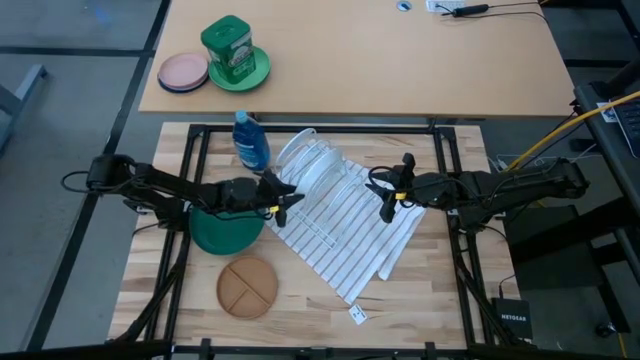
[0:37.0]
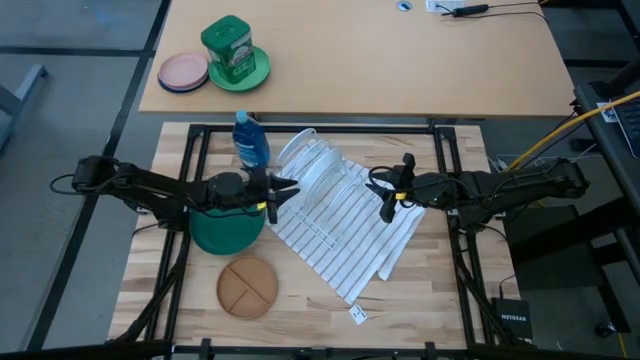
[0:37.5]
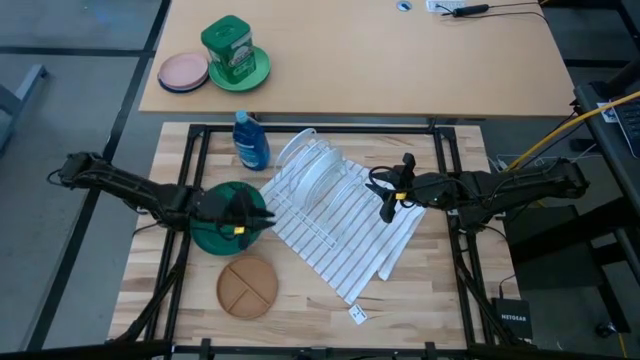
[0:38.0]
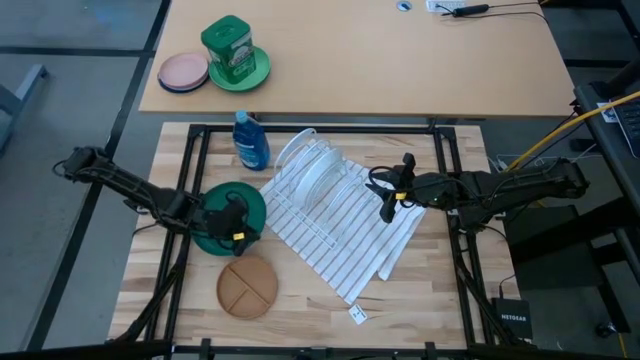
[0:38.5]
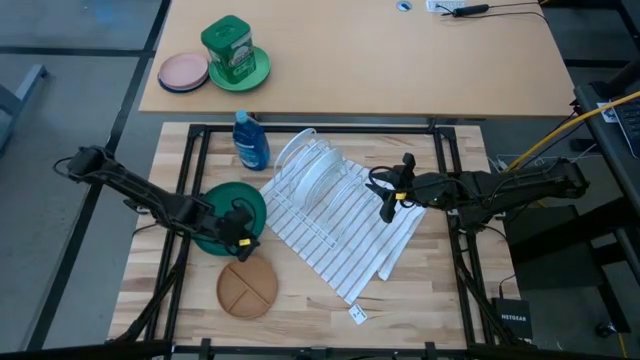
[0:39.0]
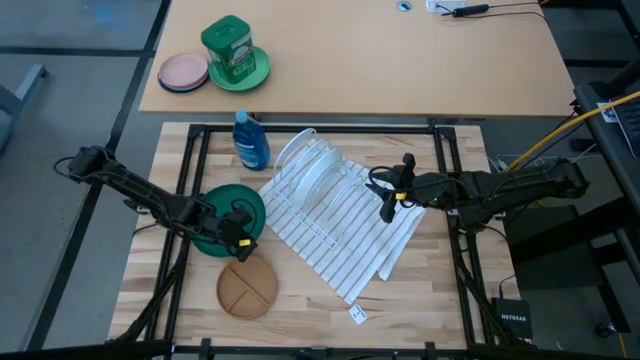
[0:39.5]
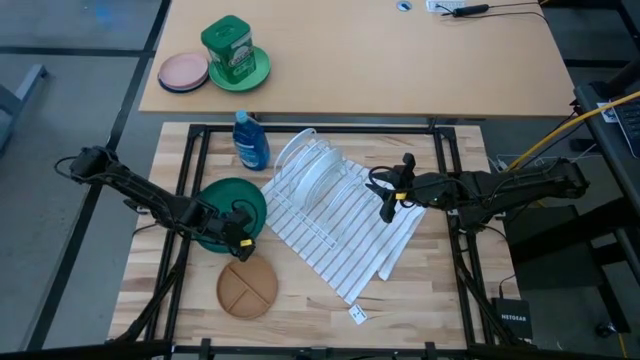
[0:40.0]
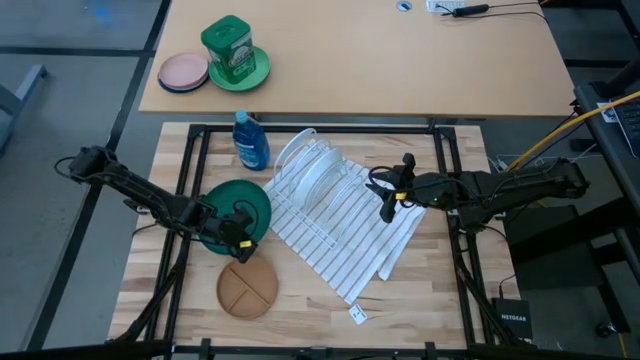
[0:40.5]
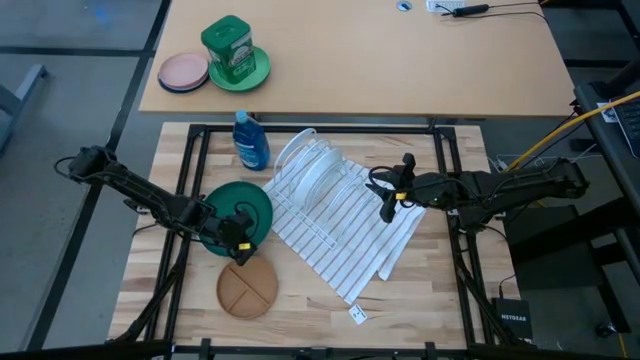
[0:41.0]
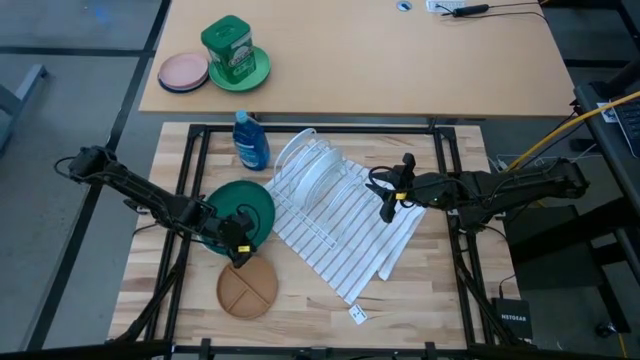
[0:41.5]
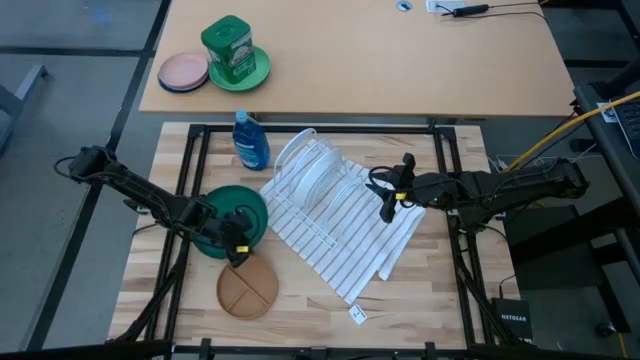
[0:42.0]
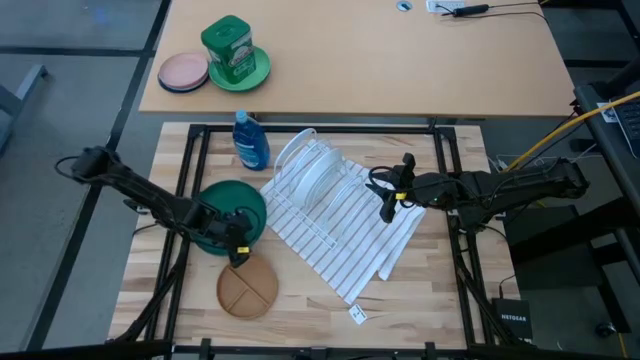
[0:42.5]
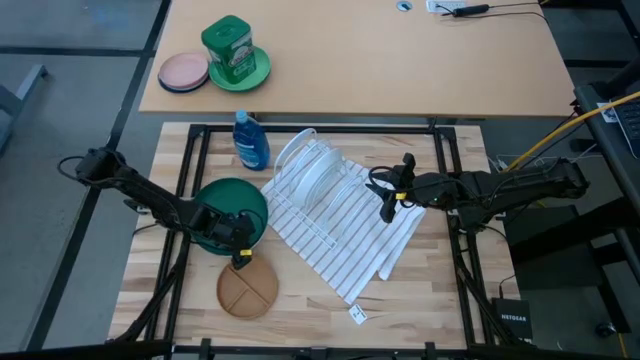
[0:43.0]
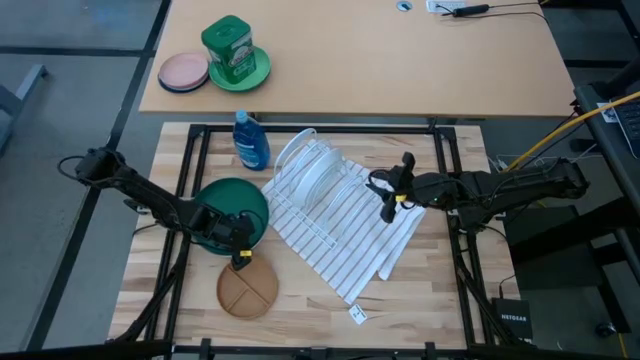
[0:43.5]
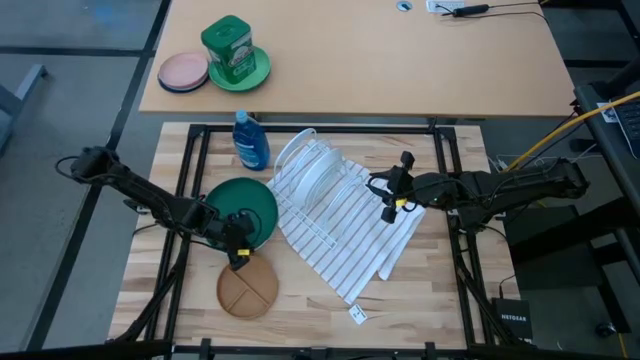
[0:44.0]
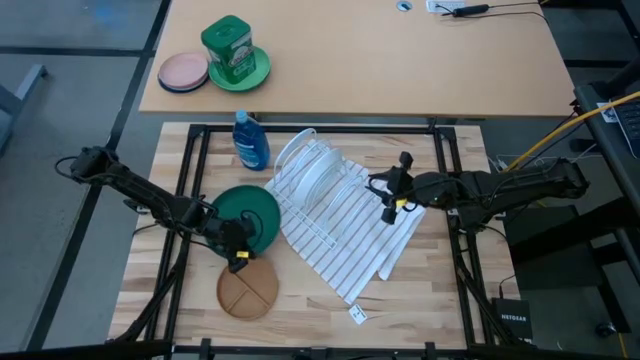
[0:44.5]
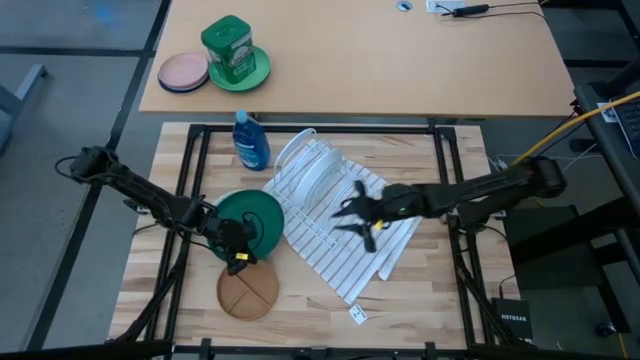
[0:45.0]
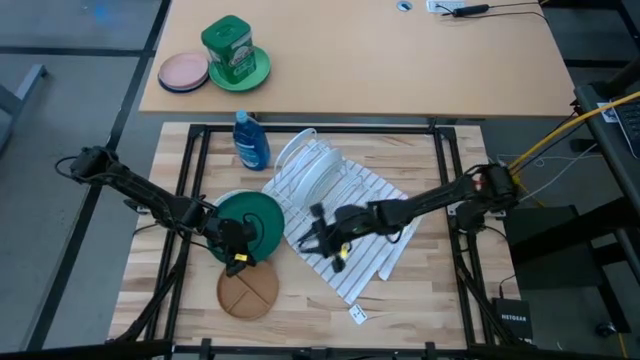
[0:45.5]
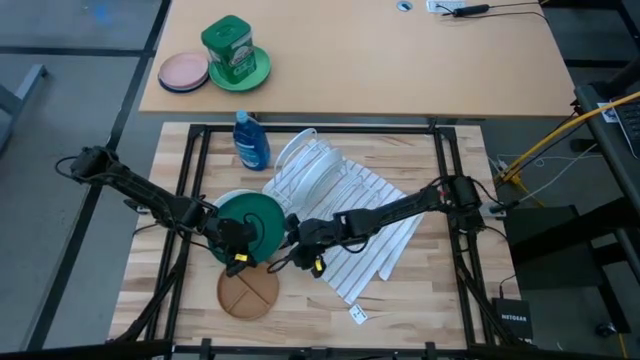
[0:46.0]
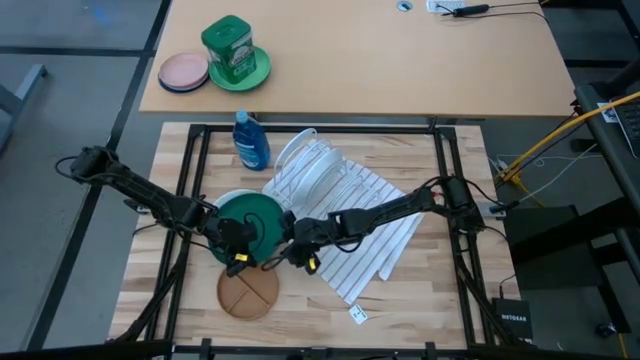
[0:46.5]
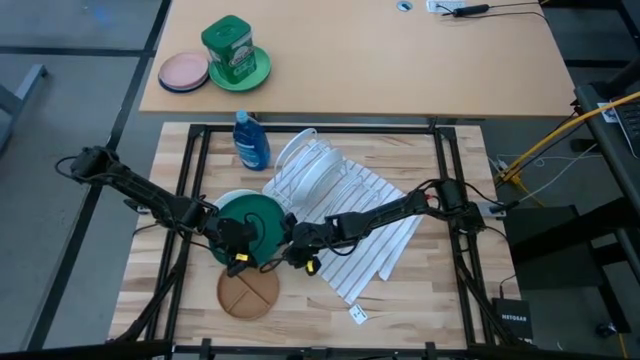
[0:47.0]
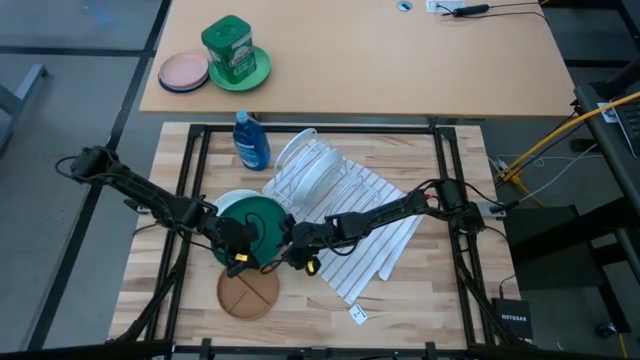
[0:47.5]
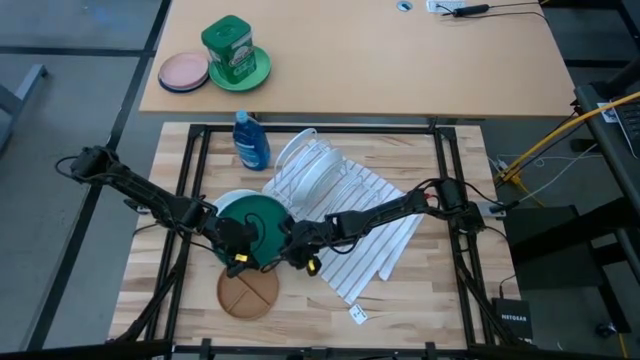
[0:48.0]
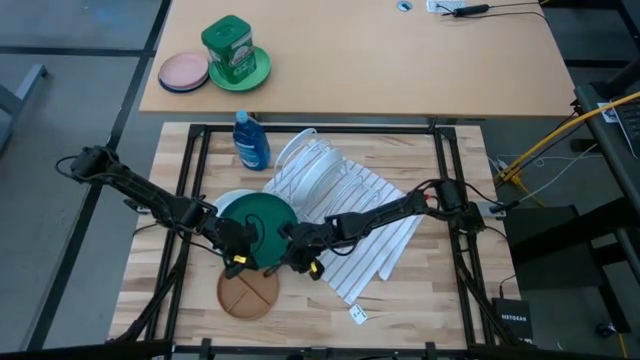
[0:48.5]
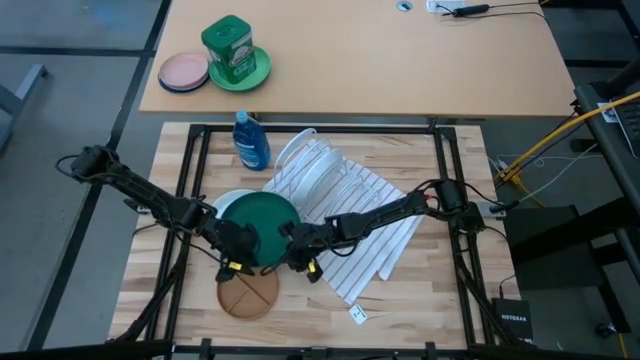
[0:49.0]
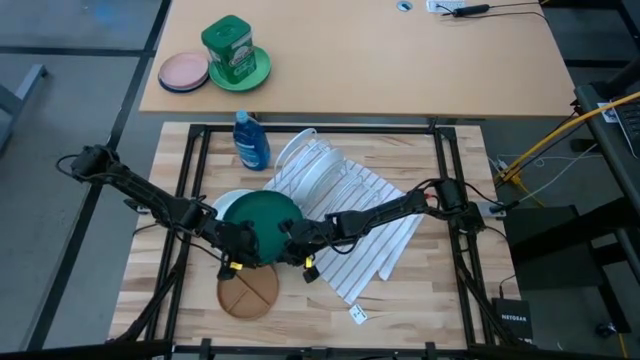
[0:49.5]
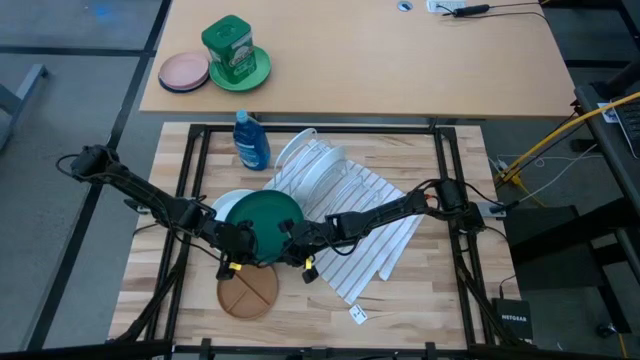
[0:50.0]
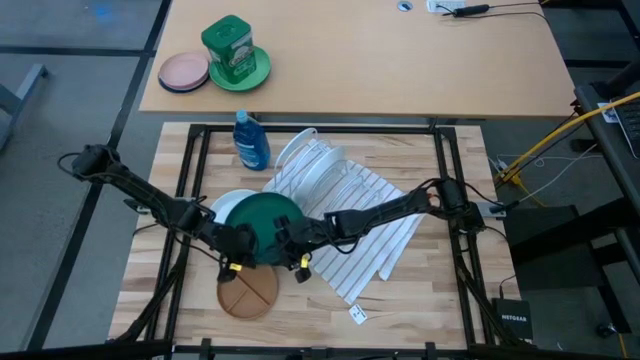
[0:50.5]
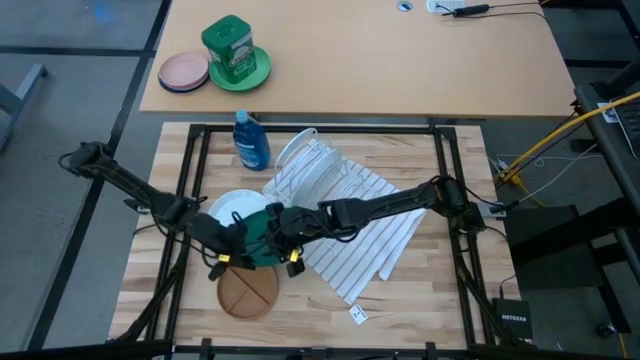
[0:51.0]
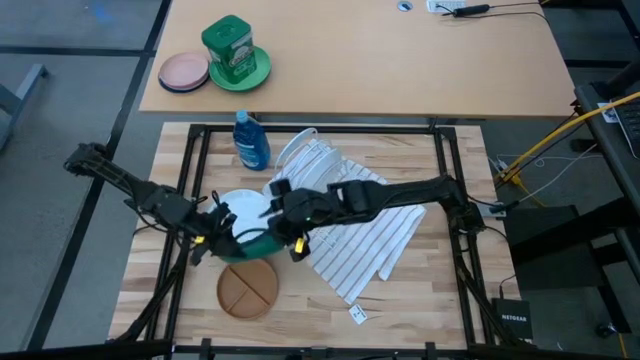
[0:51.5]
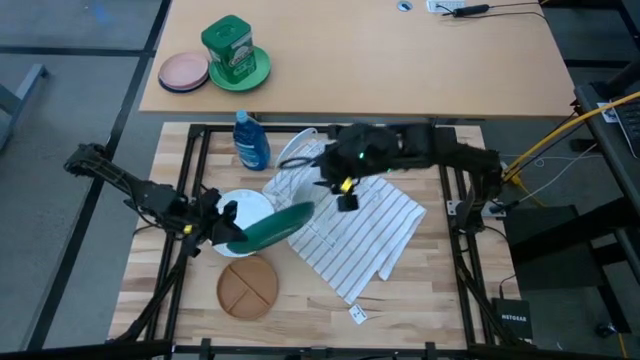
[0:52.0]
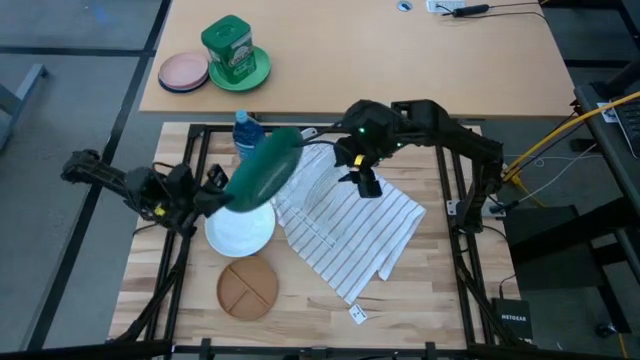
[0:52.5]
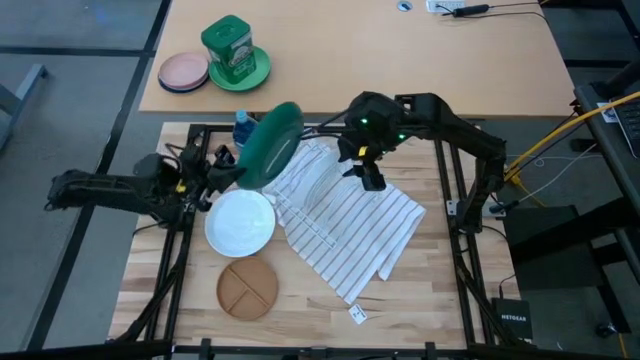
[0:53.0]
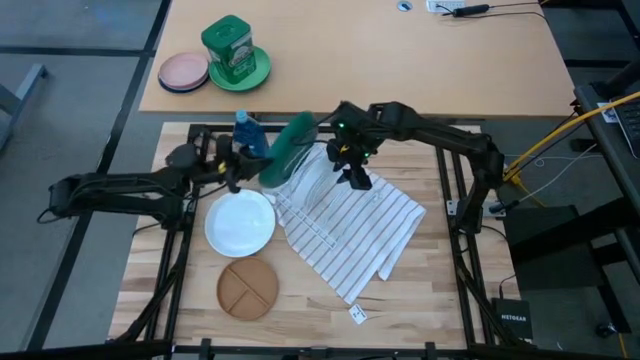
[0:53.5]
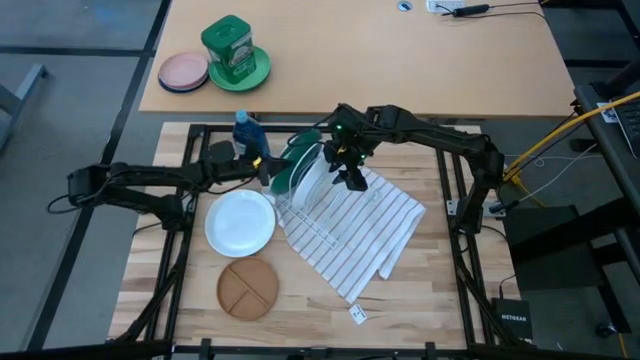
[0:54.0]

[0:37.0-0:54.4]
Task: Sort dishes
Put the green plate into the white dish rack

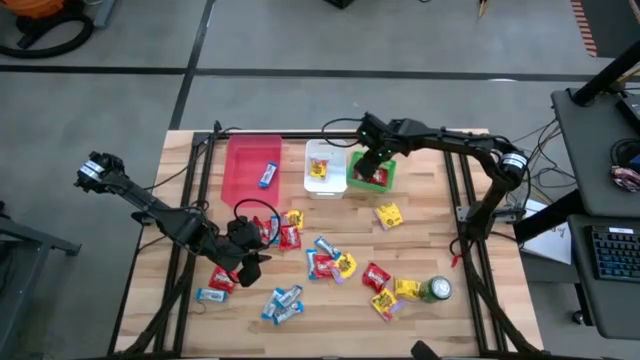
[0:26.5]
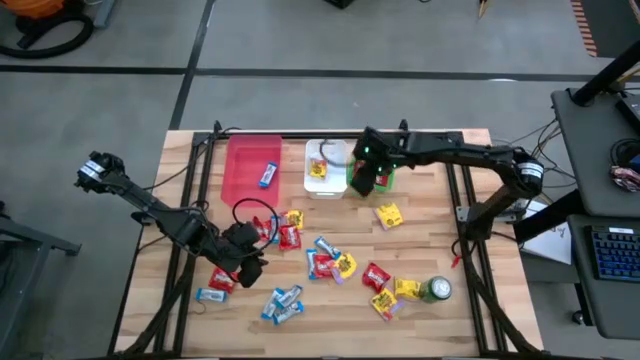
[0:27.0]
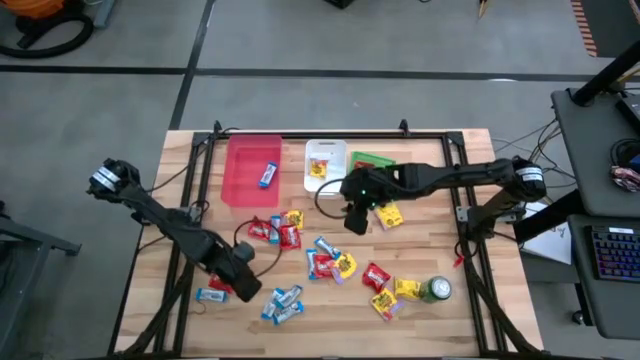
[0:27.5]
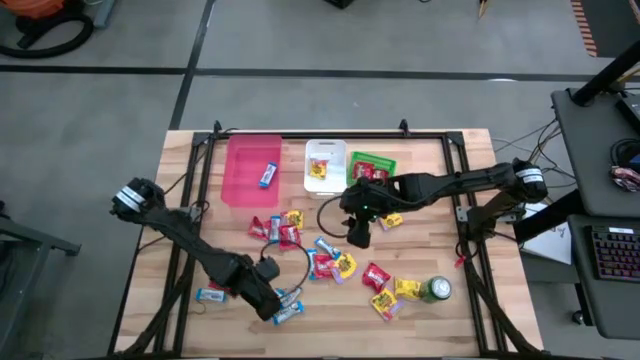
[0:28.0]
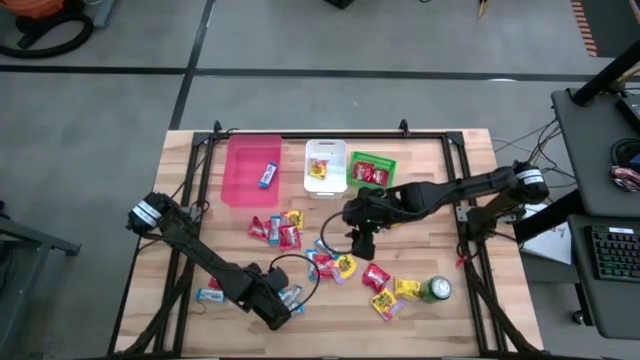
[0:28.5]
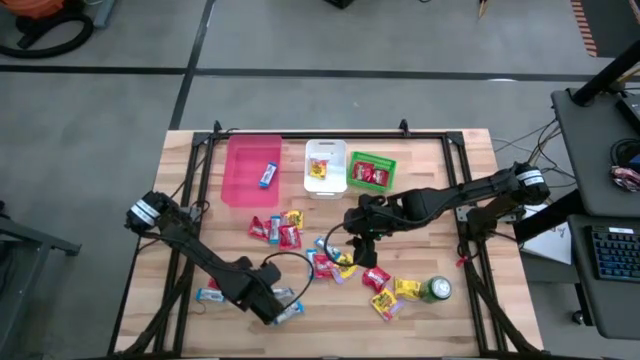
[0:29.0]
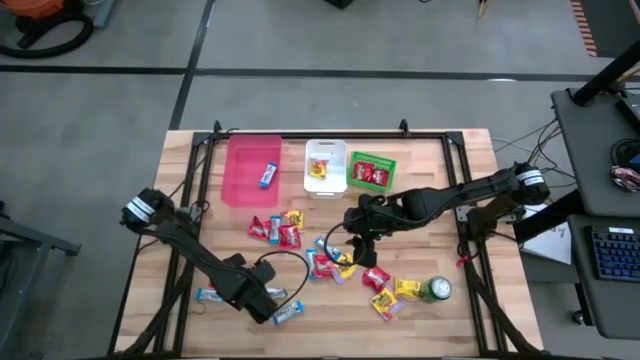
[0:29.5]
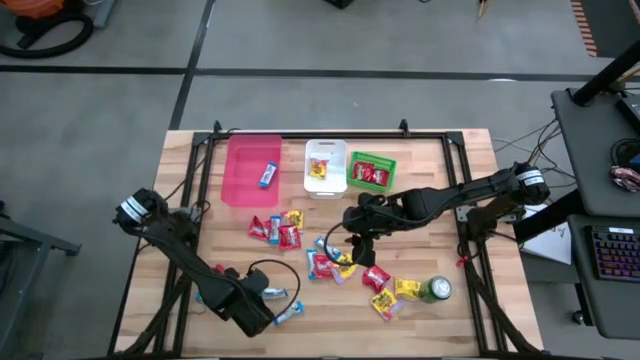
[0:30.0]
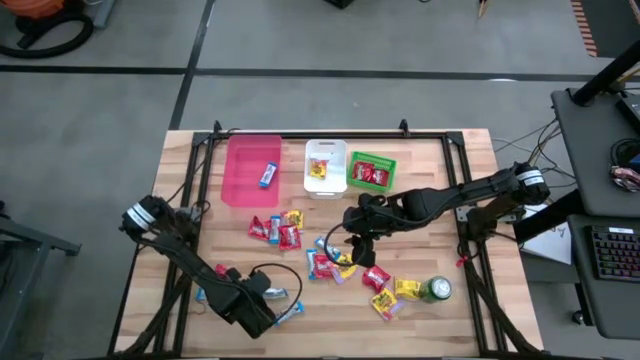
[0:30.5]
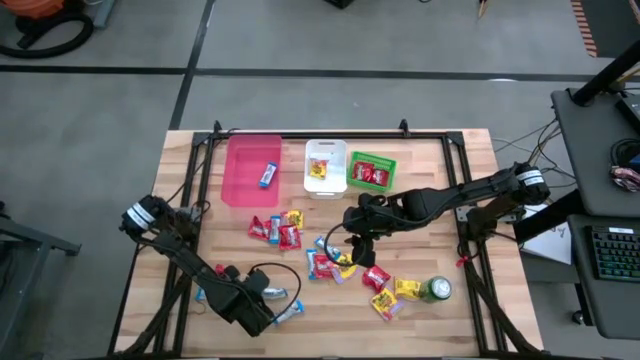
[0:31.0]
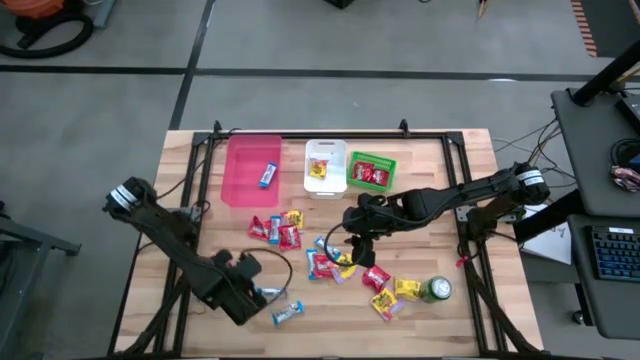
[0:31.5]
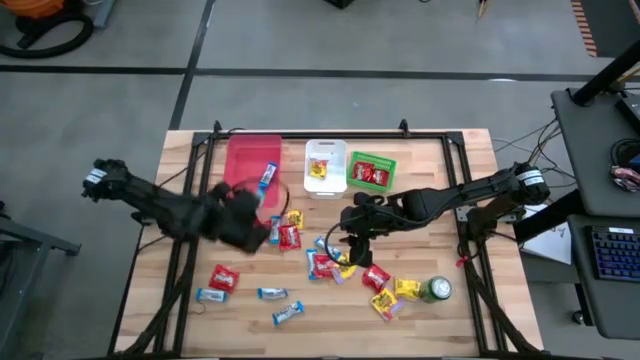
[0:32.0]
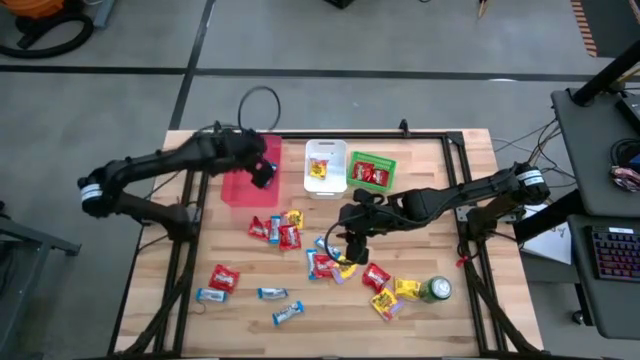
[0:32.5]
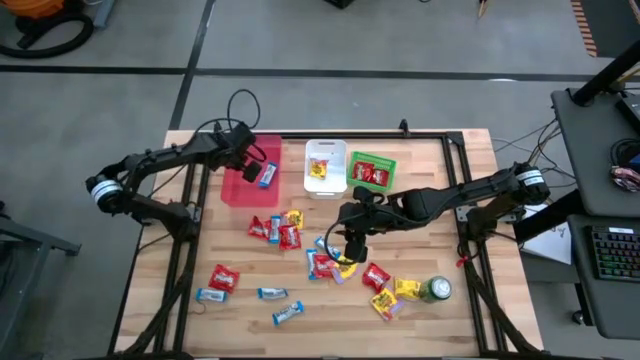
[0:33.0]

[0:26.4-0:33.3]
Task: Sort candy
Put the white chocolate into the pink bin
